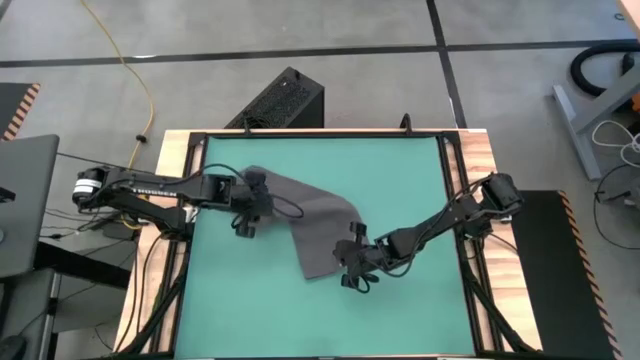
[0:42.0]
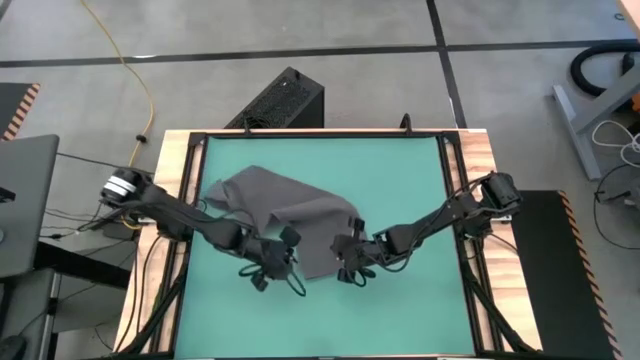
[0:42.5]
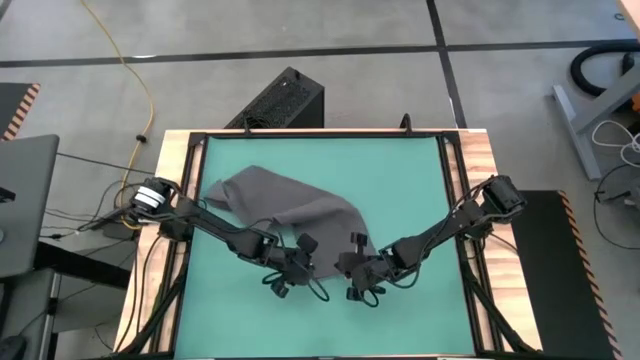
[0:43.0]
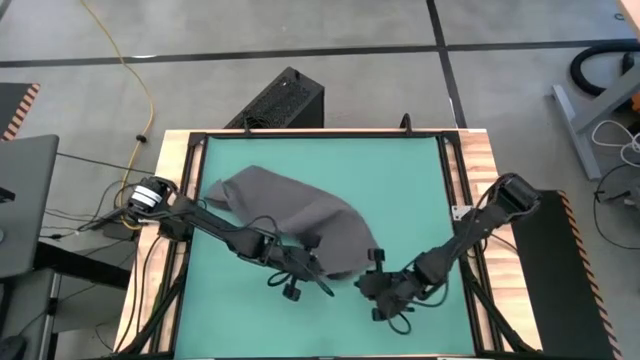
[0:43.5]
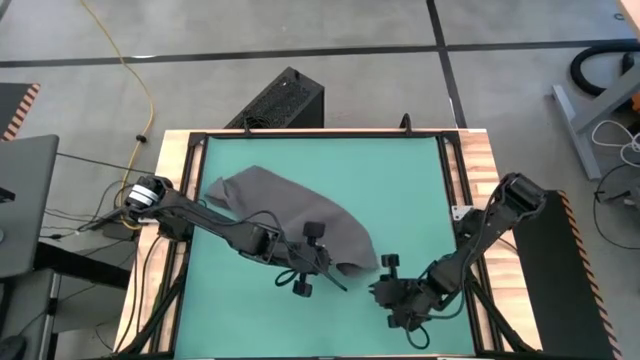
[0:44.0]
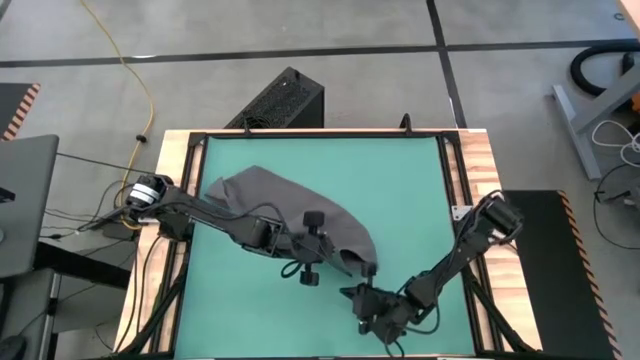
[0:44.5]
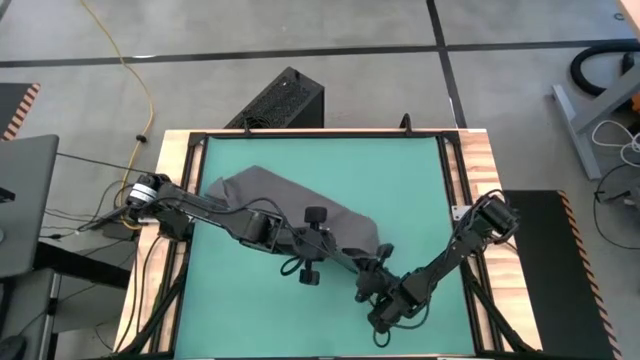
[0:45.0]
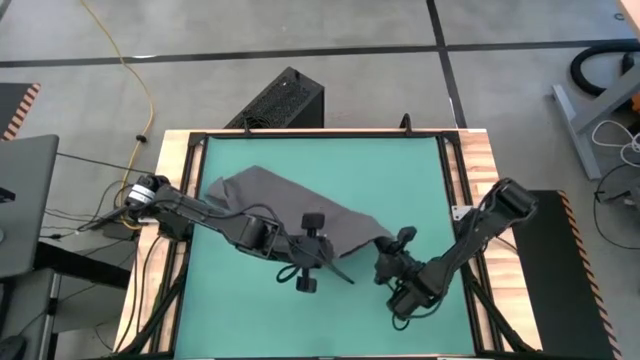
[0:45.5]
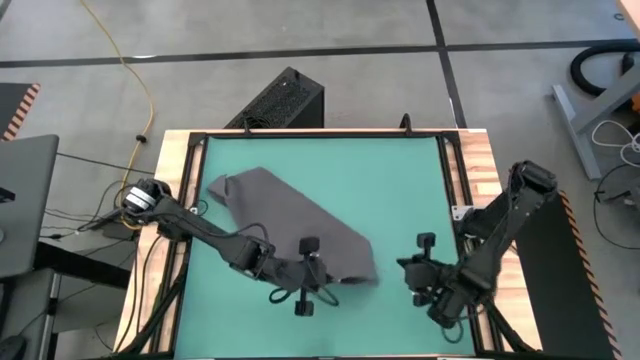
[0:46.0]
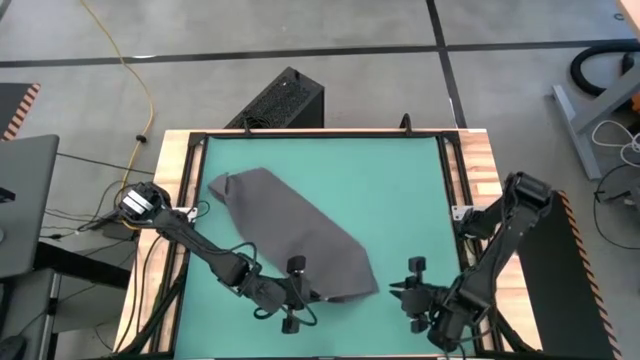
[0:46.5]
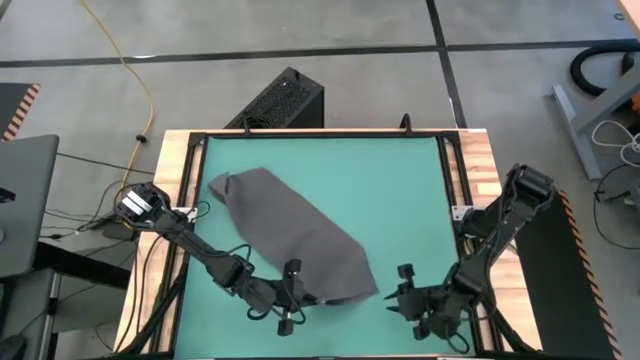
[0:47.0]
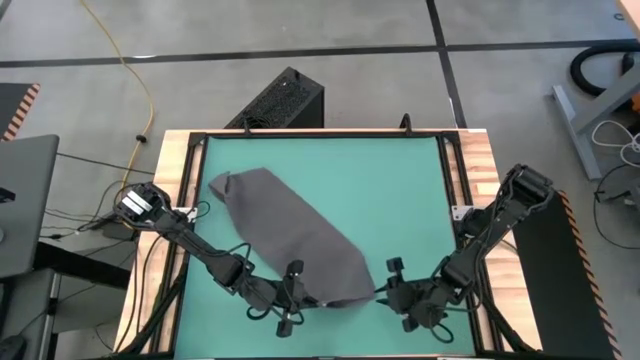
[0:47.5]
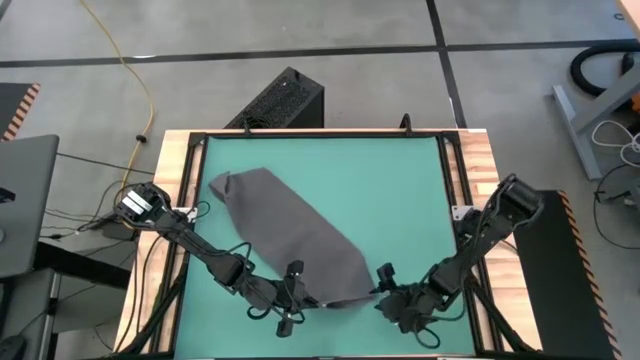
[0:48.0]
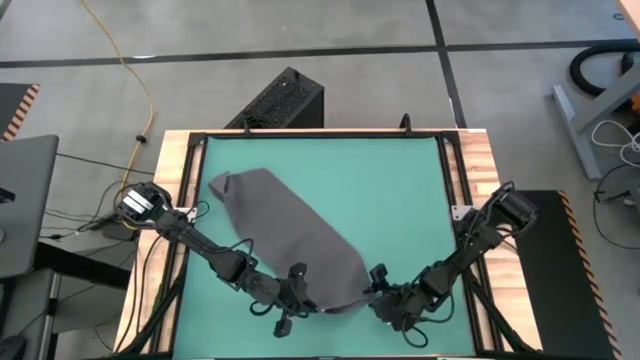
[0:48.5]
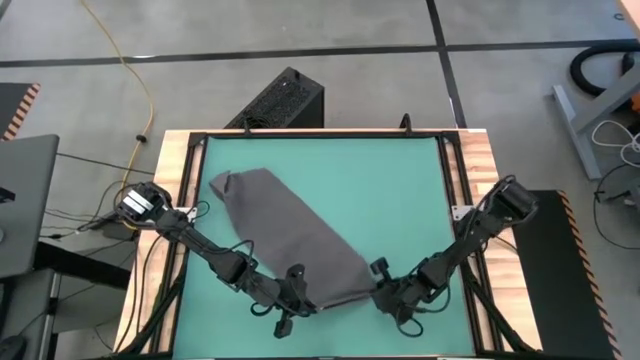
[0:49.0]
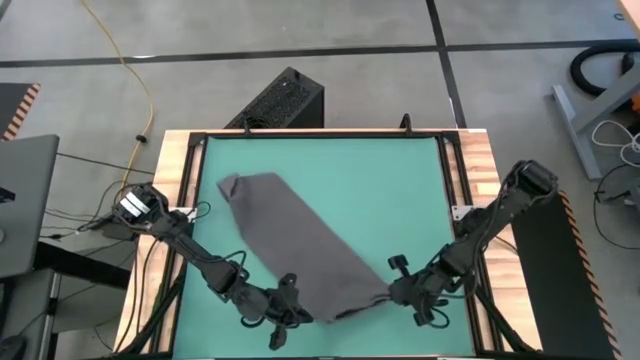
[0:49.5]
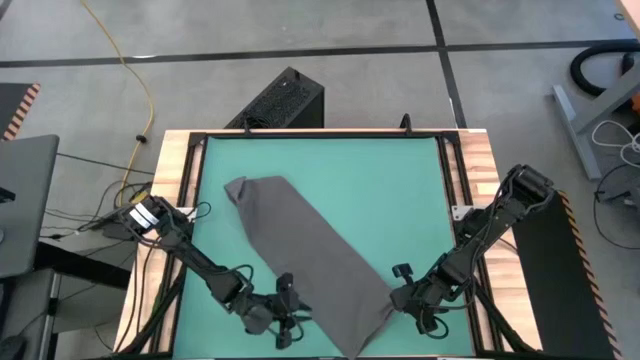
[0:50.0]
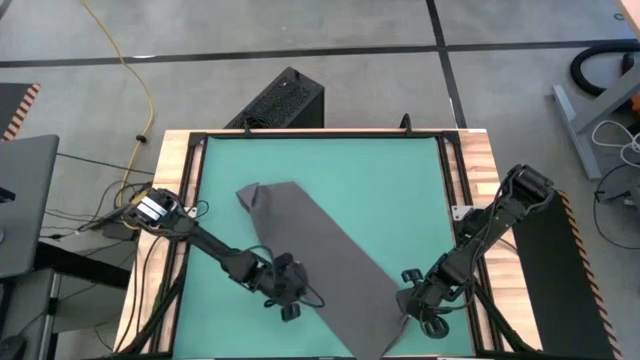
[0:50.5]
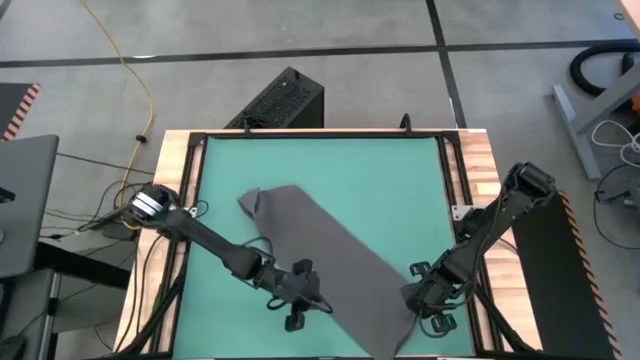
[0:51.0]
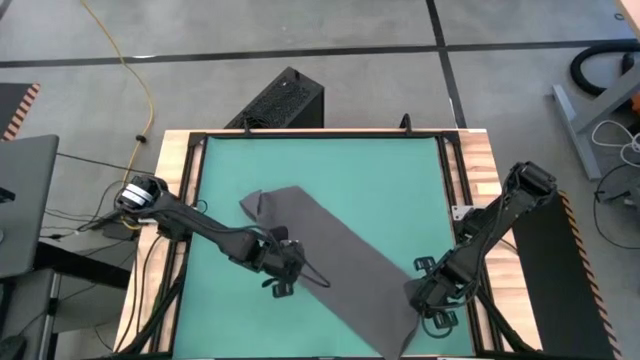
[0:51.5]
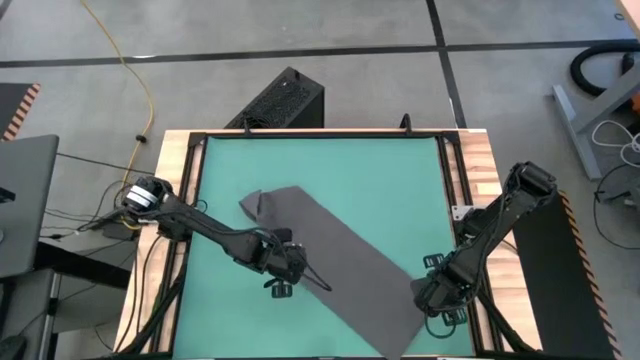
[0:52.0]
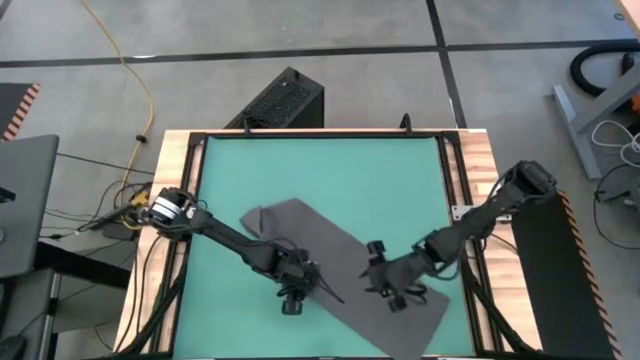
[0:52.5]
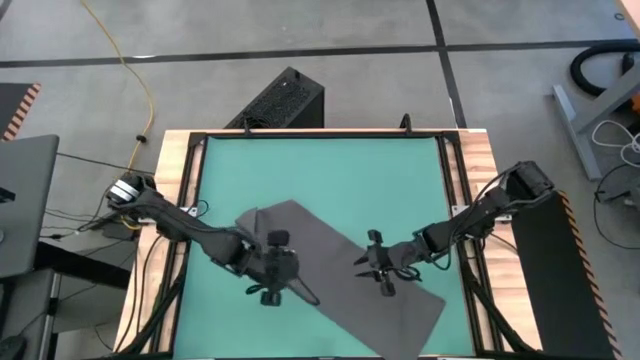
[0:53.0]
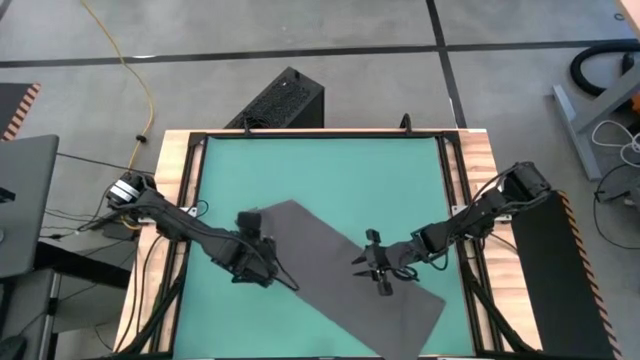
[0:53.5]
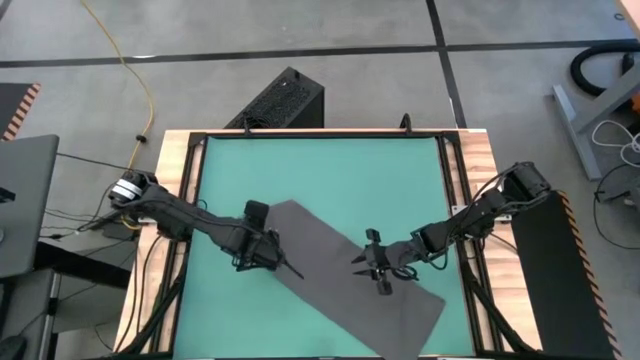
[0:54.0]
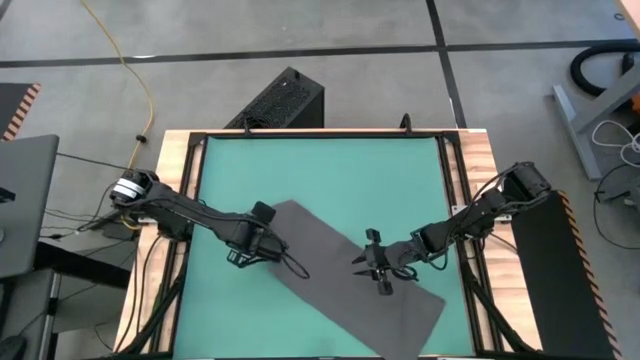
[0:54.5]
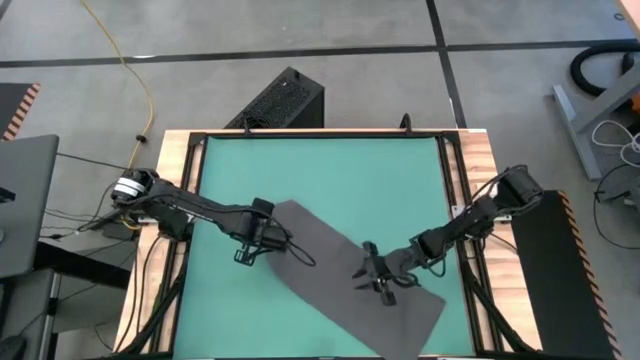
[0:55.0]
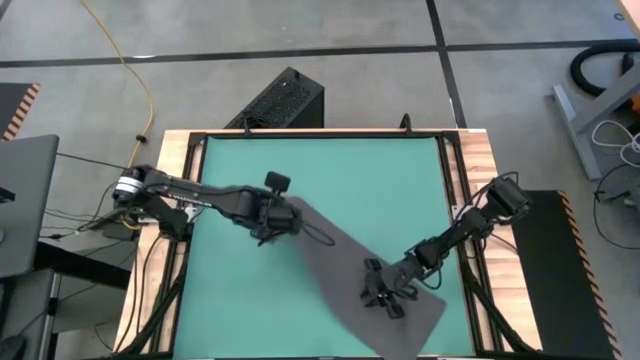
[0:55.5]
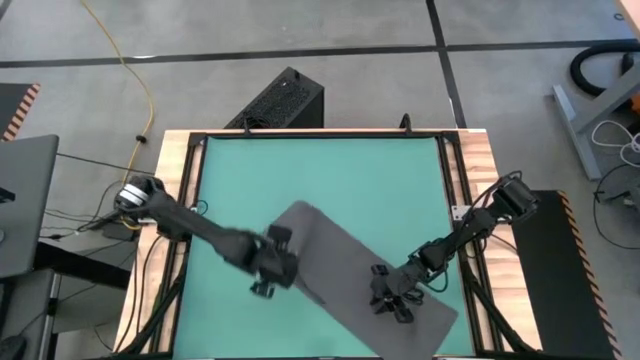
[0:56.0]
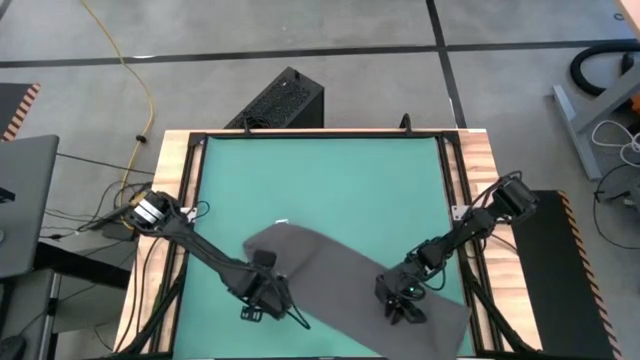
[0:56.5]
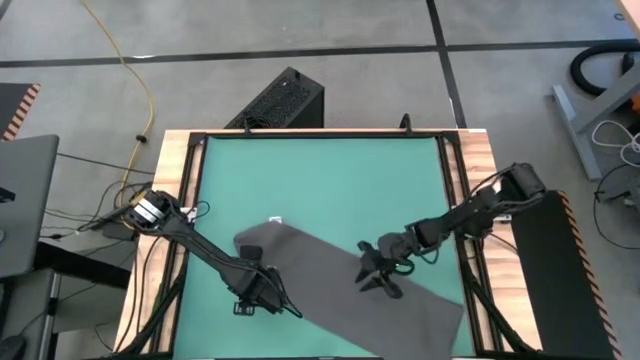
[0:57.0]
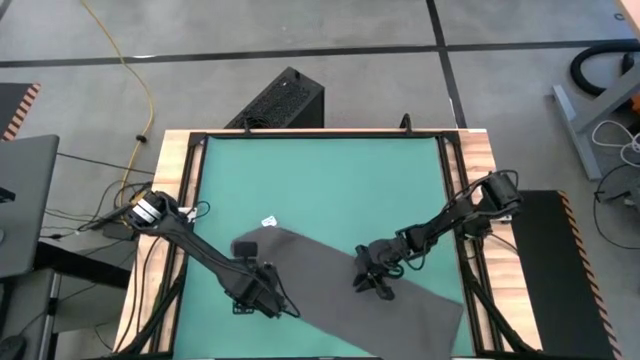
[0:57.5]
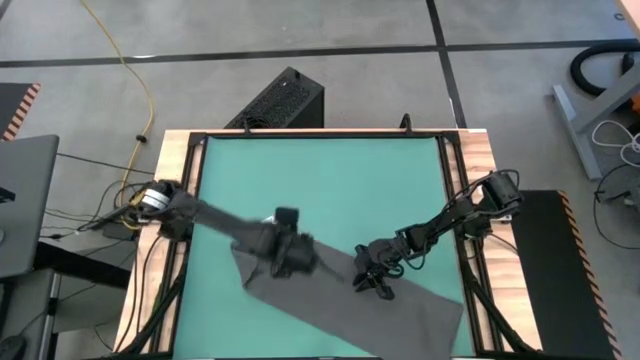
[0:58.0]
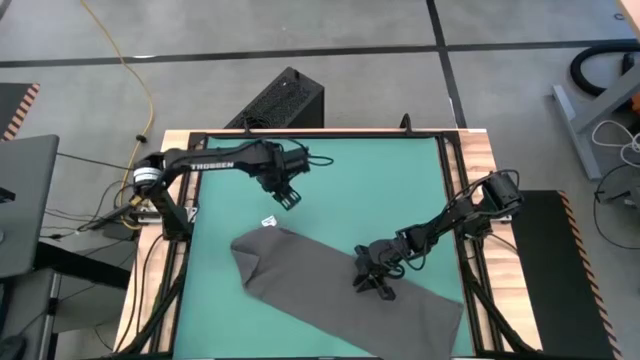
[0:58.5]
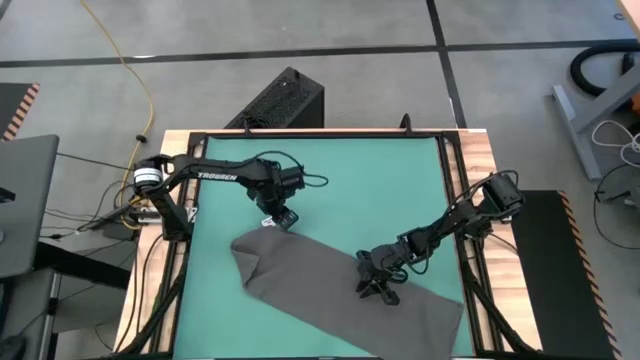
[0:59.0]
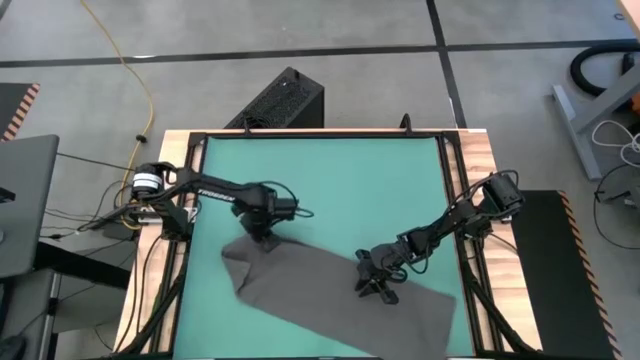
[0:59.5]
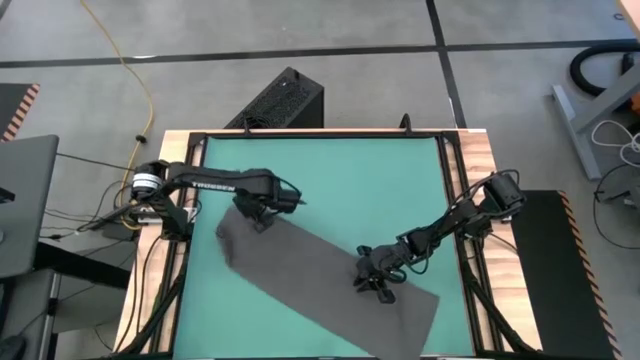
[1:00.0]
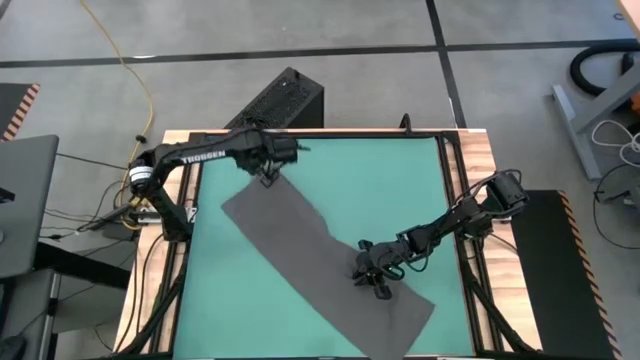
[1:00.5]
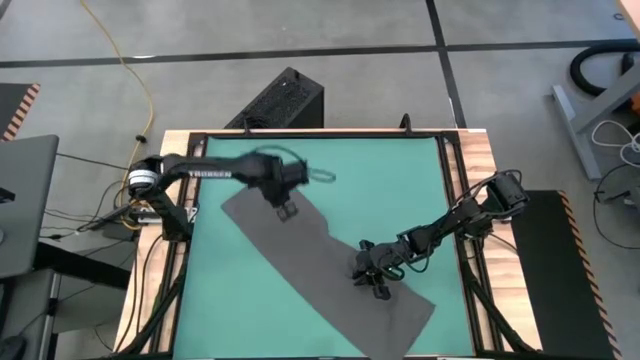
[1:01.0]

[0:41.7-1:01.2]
Task: Roll towel
Roll the gray towel

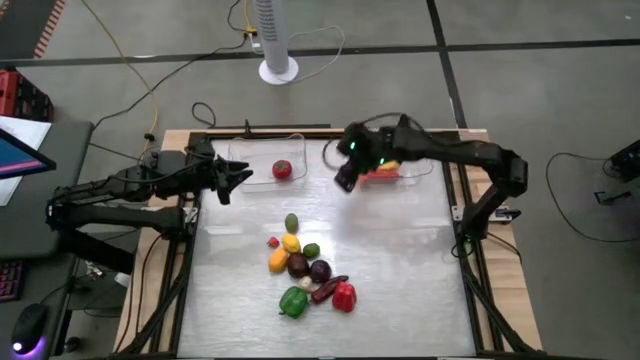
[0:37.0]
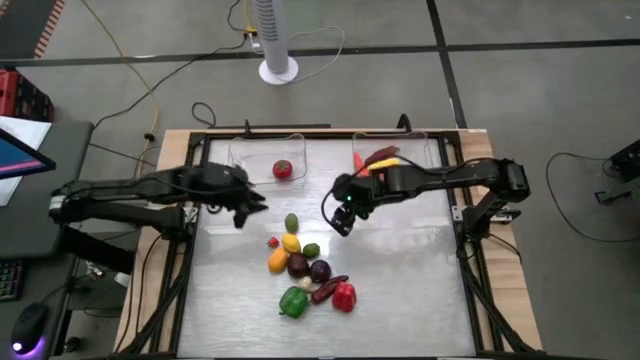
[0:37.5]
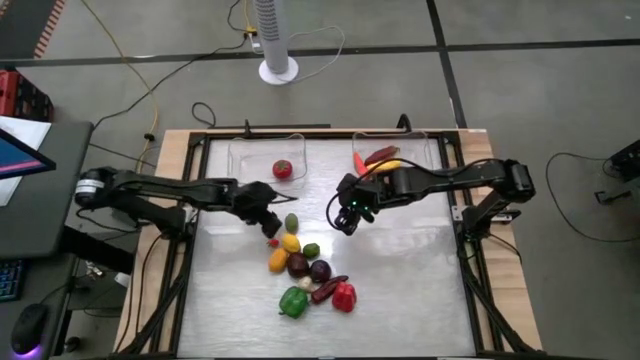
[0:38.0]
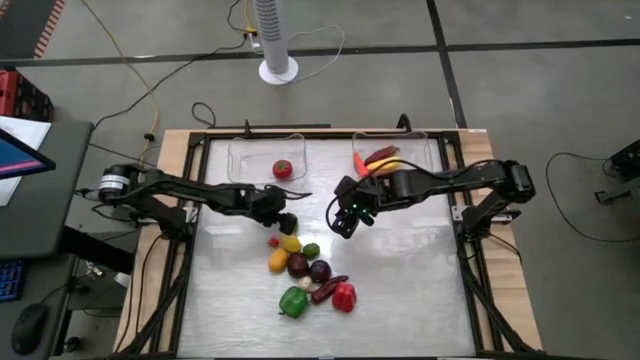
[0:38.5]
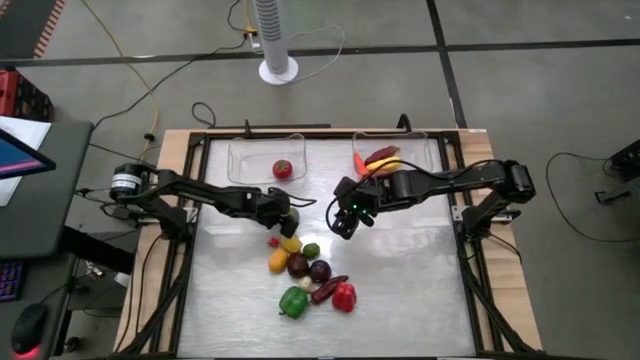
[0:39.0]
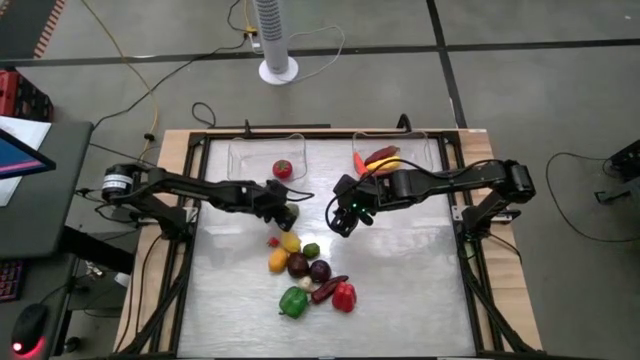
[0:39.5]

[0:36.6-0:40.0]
Task: Sort produce into baskets
Put the green lemon into the left transparent bin
